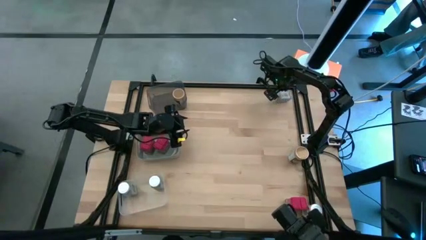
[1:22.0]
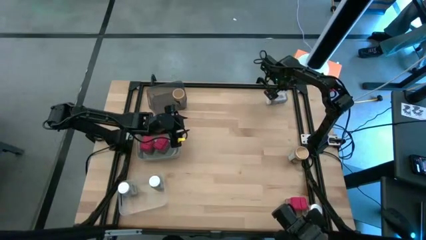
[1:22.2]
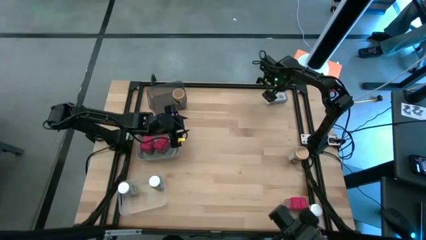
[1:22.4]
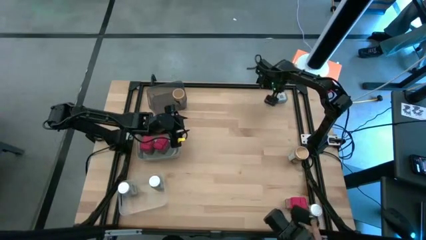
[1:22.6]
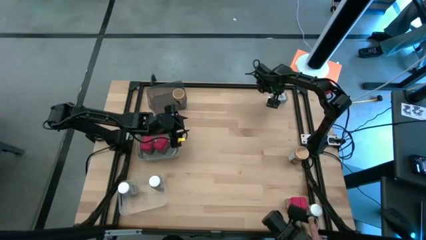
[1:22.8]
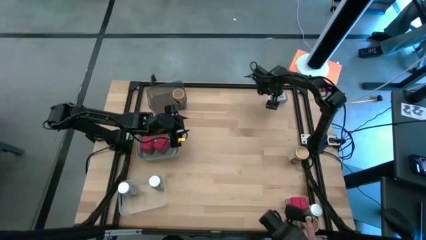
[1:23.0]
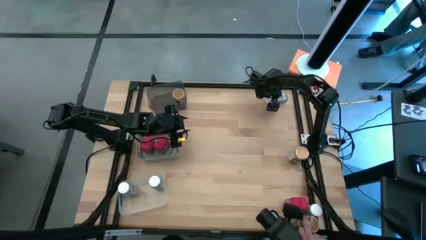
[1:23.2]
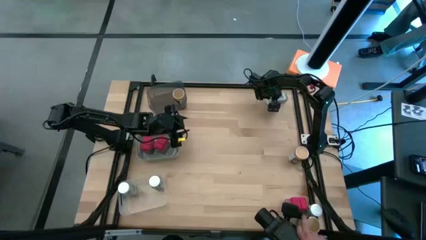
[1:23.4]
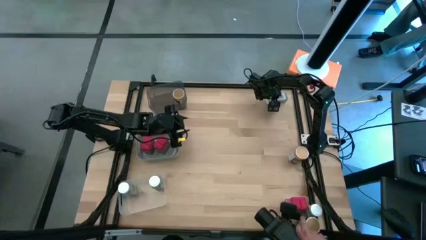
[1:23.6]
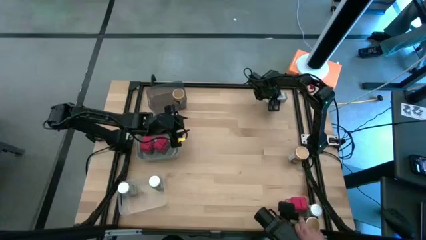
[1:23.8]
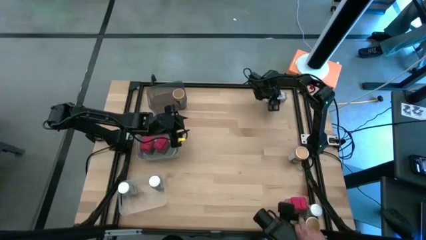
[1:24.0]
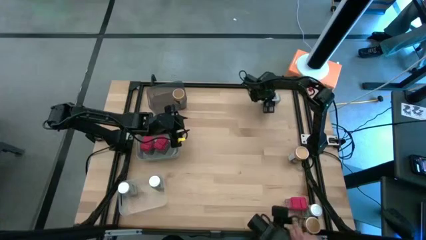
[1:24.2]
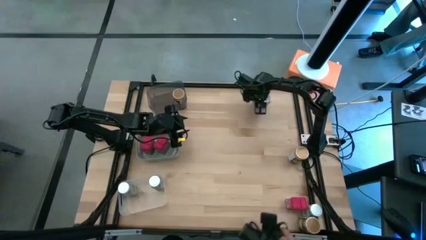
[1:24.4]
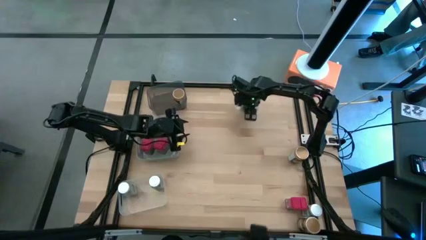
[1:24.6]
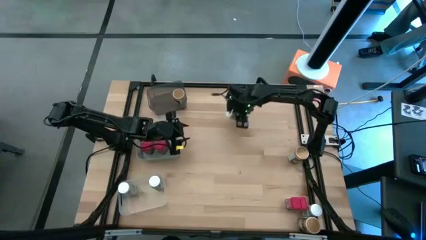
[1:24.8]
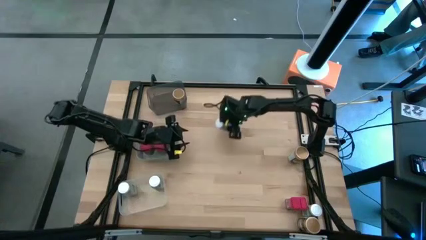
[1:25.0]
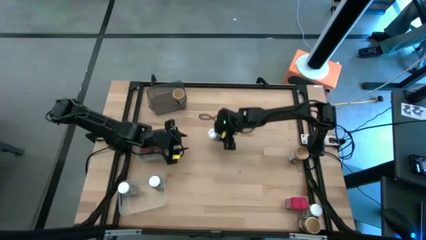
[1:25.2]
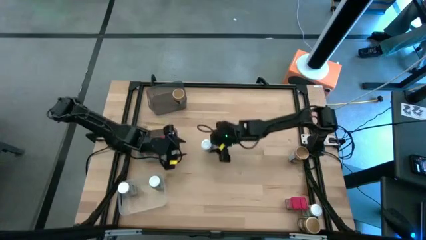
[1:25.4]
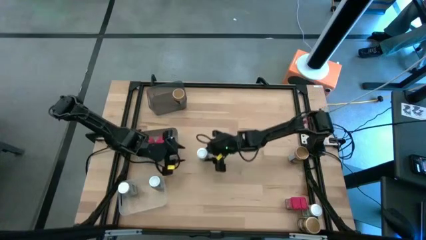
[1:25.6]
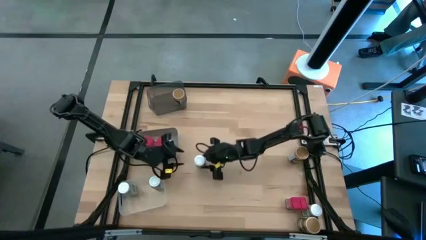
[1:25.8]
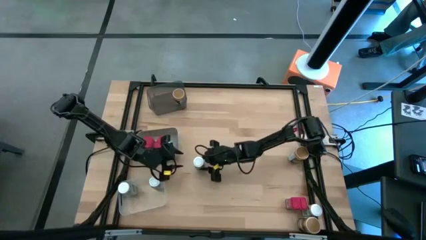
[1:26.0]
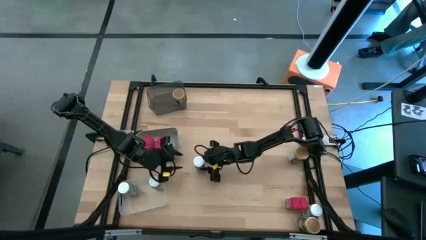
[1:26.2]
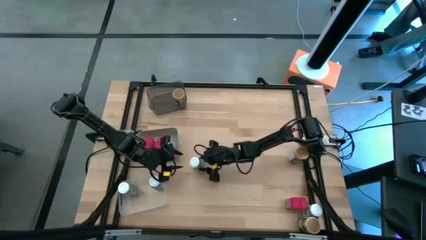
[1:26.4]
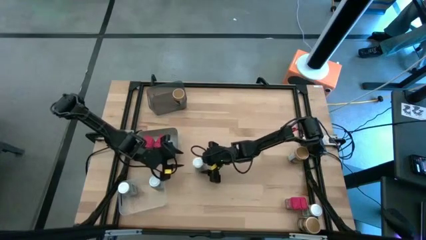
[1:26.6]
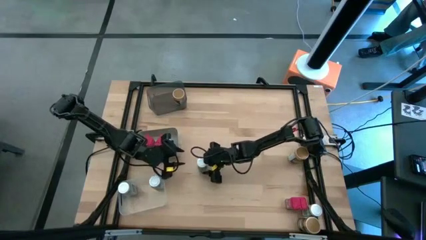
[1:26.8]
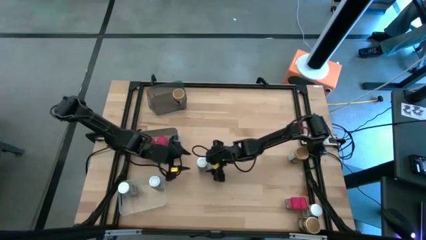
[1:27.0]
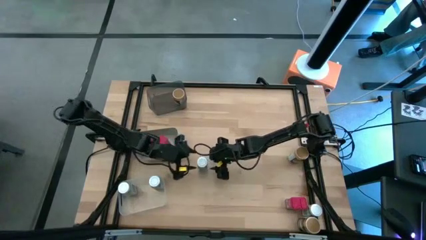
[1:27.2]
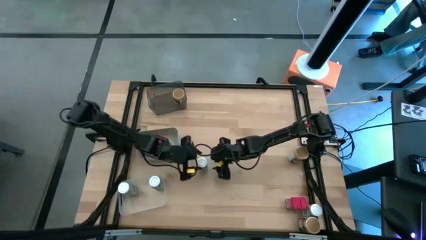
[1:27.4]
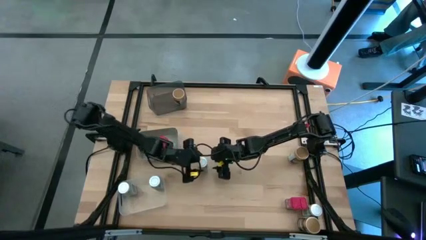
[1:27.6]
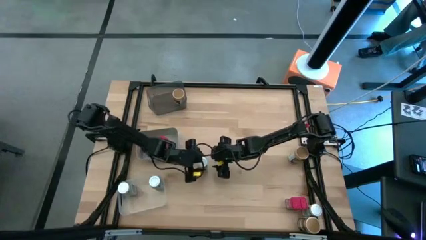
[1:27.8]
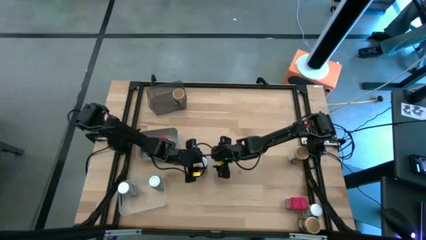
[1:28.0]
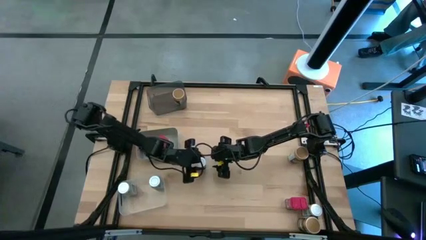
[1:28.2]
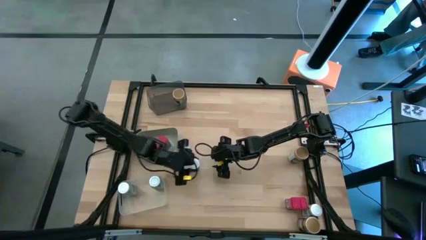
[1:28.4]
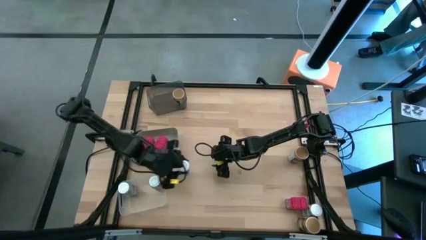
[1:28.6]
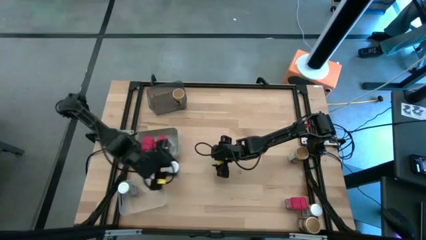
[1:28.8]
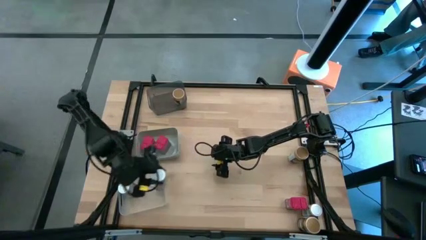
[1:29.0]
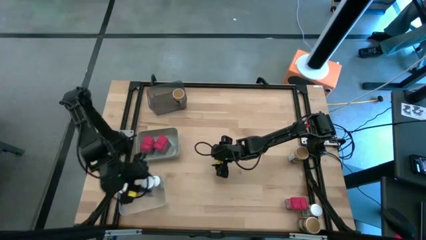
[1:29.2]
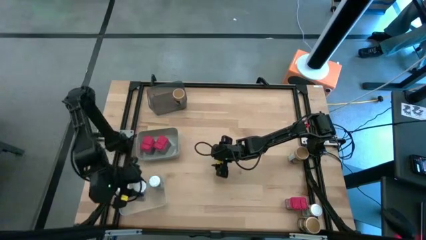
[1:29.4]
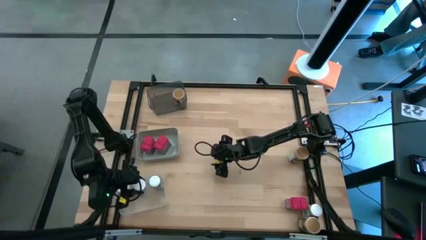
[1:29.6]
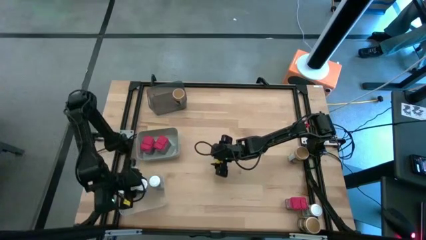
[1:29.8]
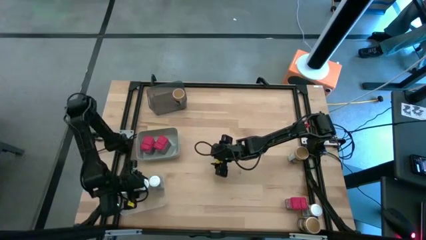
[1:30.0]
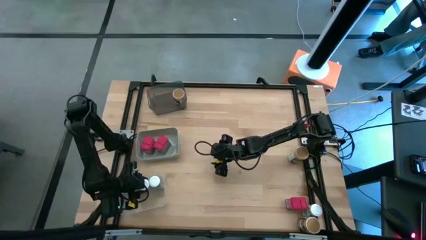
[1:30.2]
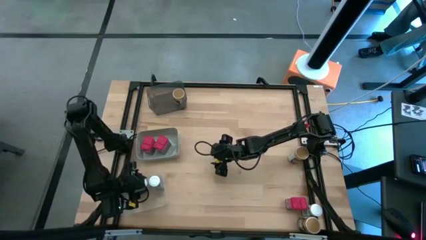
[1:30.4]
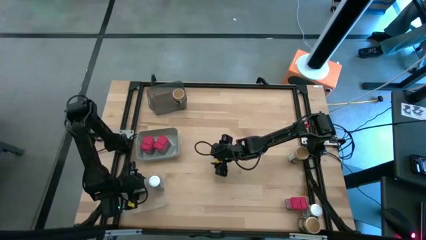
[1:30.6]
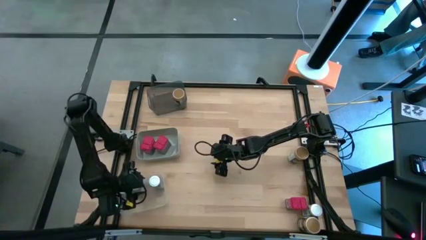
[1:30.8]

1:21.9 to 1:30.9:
Task: Sort spices by type
Put the top white seasoning can into the bottom left transparent bin

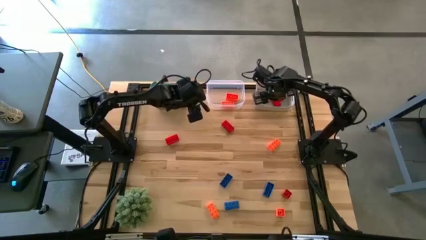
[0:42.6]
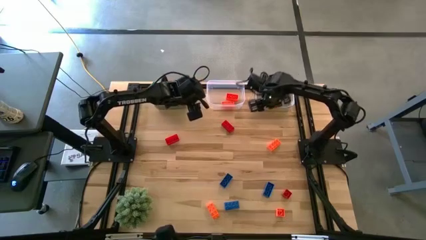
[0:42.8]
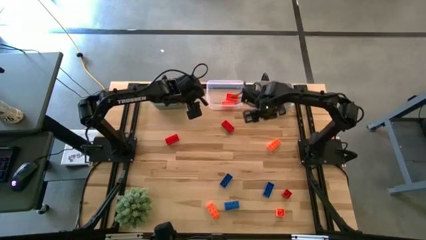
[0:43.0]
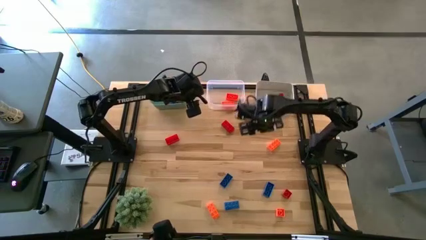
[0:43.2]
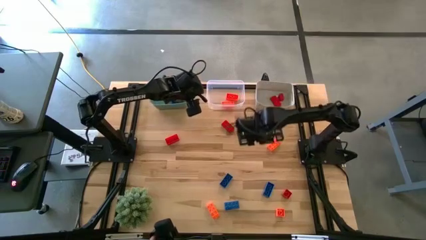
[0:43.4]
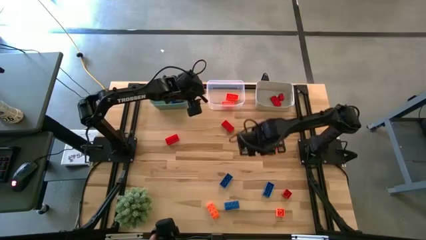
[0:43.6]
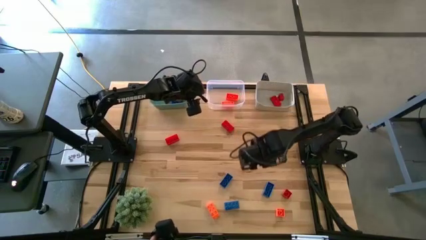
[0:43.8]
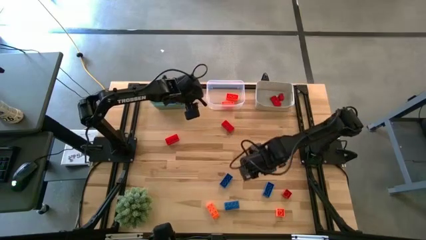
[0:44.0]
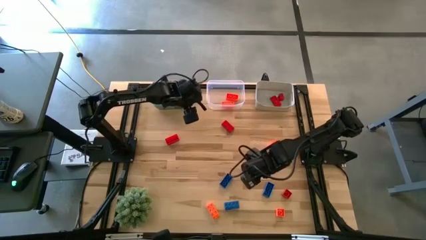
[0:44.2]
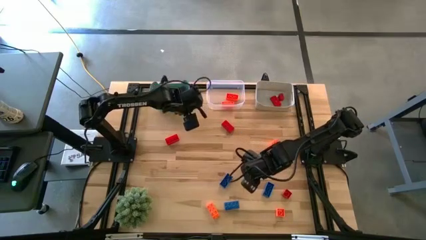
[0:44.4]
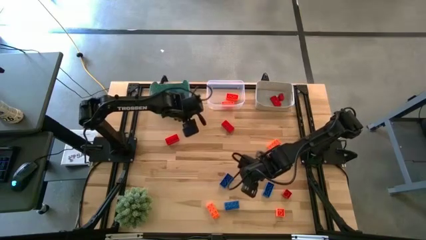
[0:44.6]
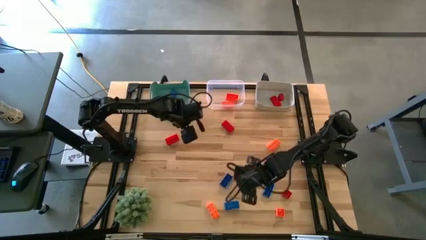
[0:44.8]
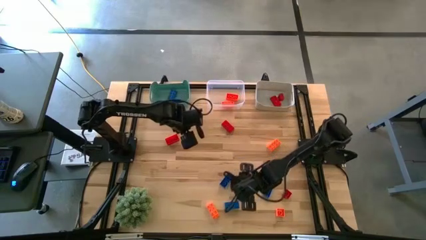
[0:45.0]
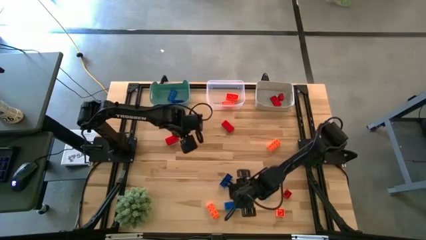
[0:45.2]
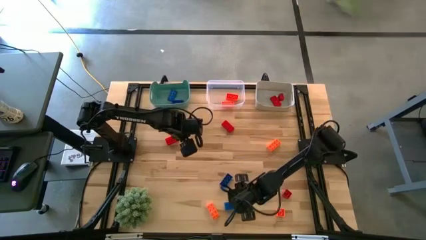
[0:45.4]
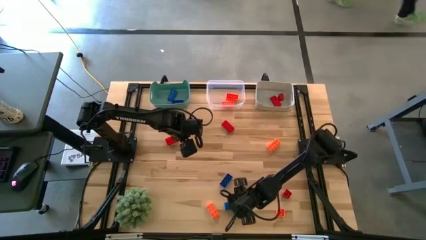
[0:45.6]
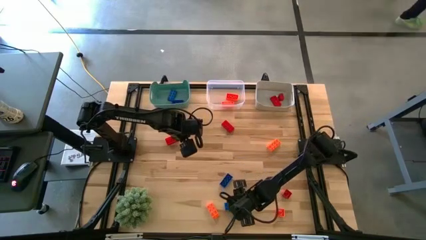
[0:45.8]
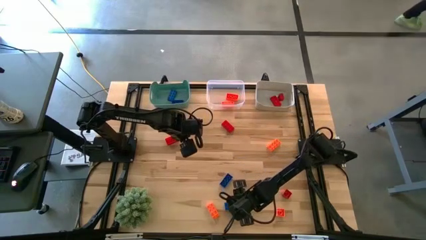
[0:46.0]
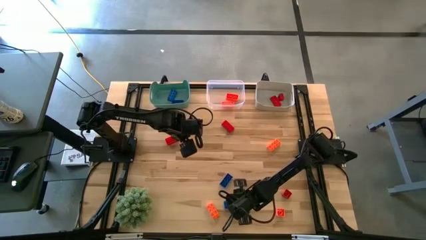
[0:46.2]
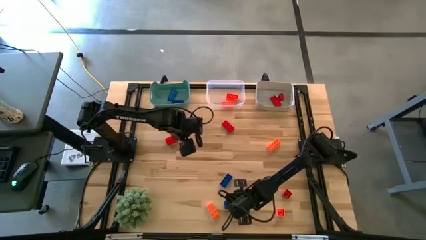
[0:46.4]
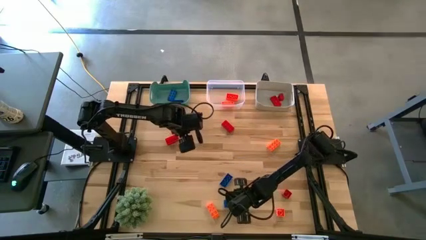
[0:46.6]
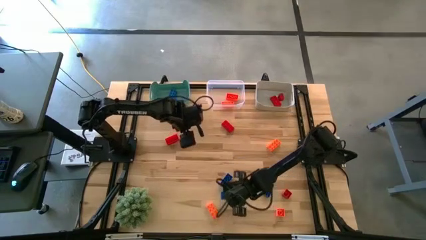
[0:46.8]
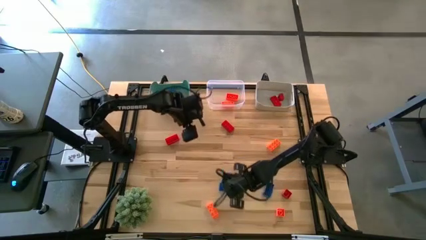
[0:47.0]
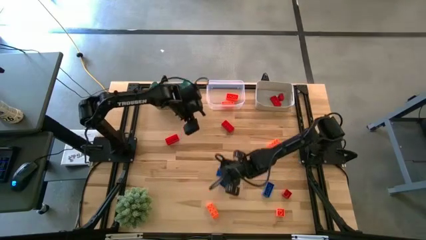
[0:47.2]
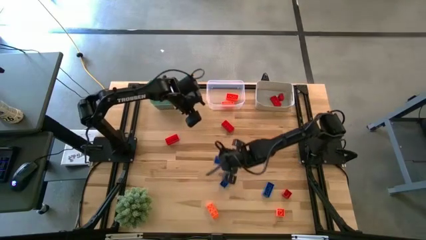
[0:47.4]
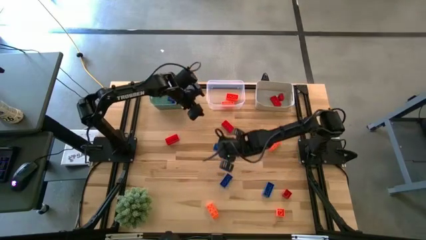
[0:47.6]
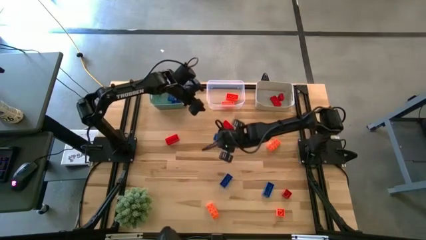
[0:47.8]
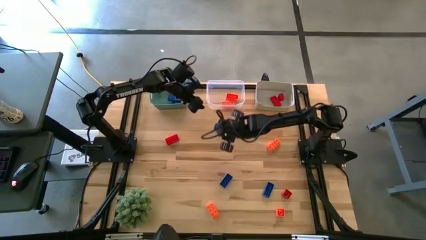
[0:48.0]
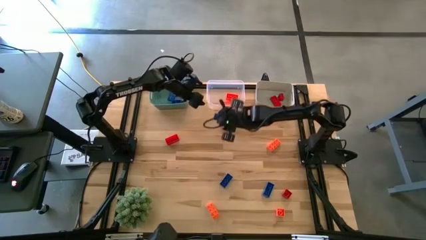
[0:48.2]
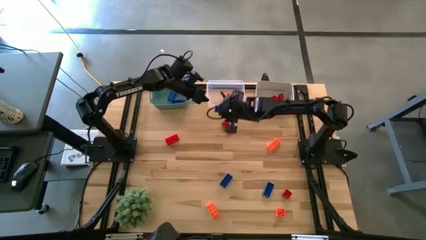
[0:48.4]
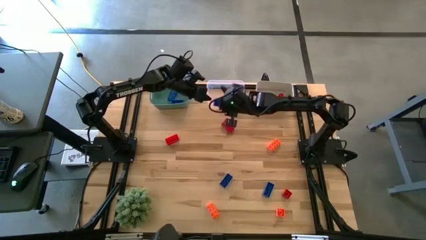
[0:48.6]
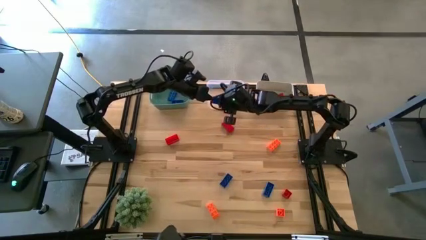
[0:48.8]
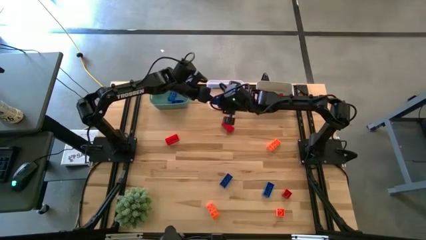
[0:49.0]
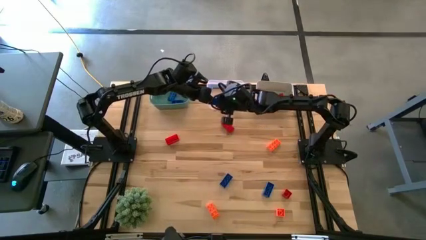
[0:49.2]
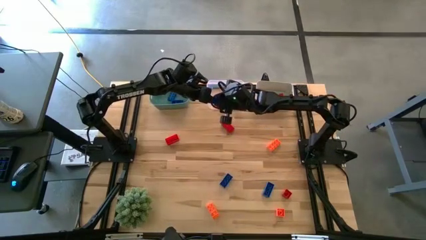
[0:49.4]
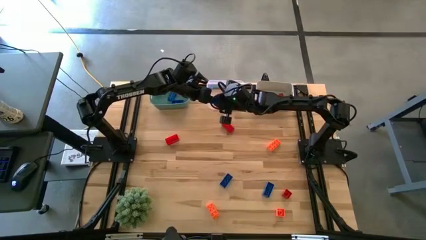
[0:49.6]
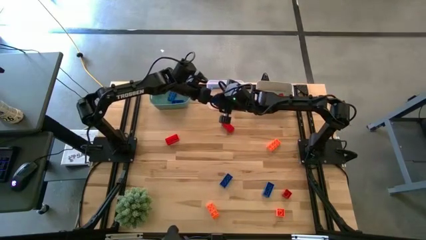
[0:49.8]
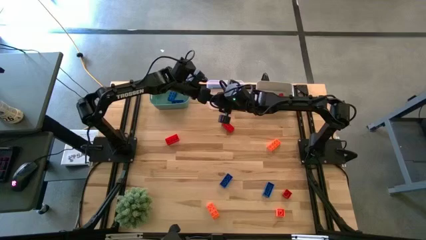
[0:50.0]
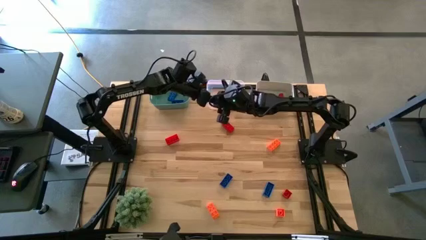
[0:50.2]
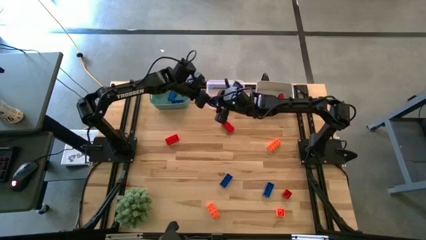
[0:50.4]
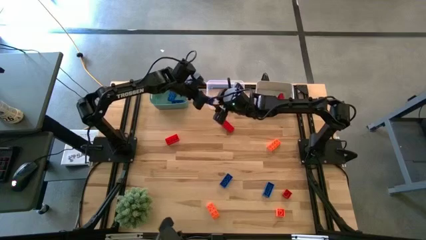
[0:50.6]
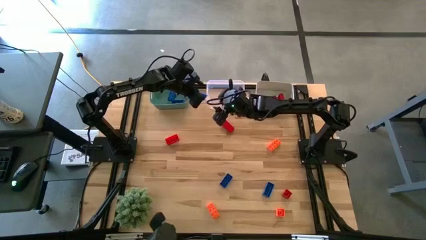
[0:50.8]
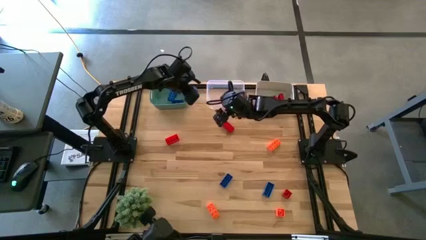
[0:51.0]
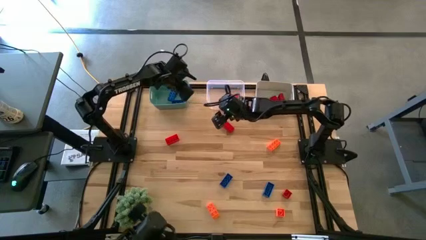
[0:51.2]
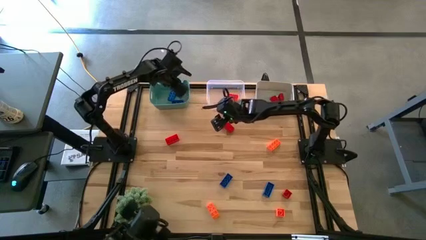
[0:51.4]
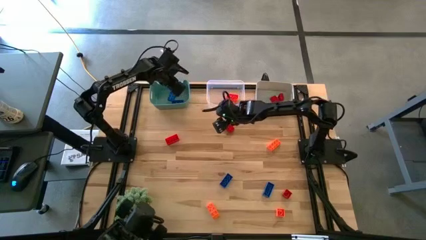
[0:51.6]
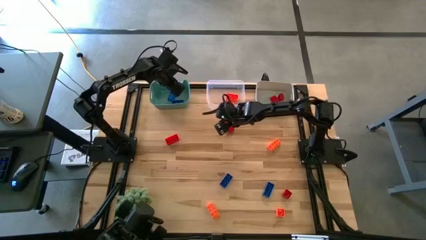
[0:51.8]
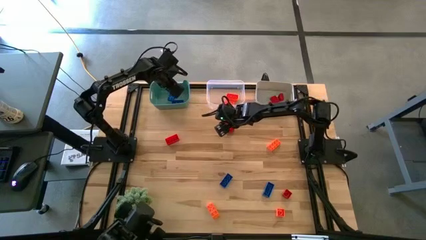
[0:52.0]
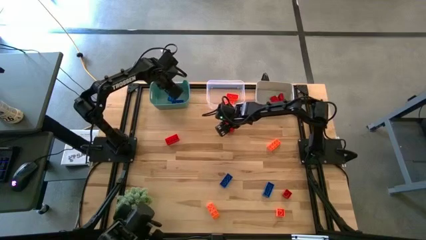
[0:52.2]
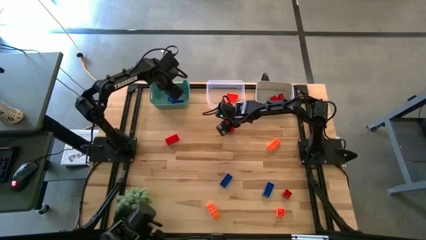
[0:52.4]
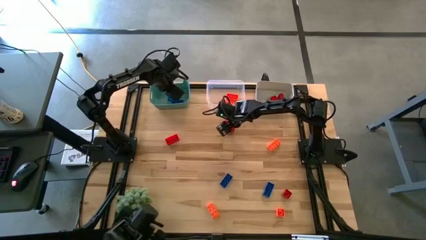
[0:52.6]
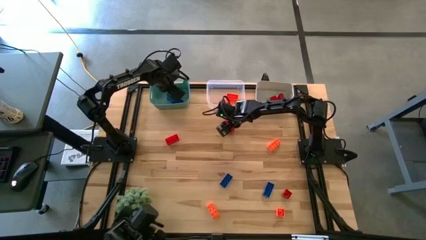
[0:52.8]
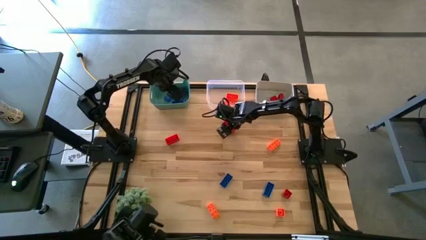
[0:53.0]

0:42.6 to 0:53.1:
Task: Sort & place blocks by color
Put the blue game piece into the green bin
